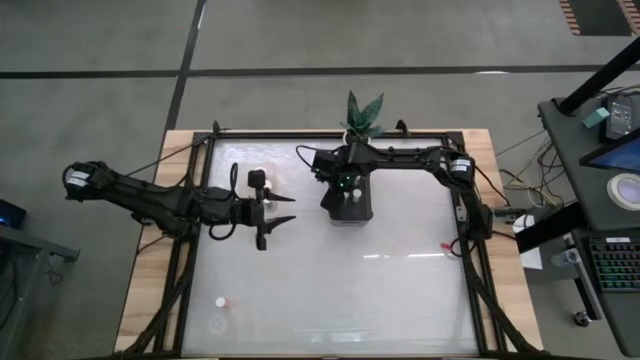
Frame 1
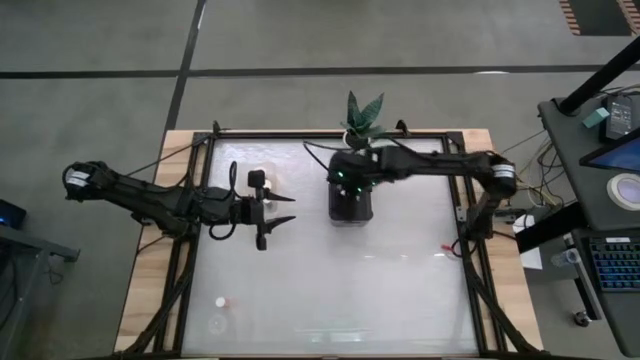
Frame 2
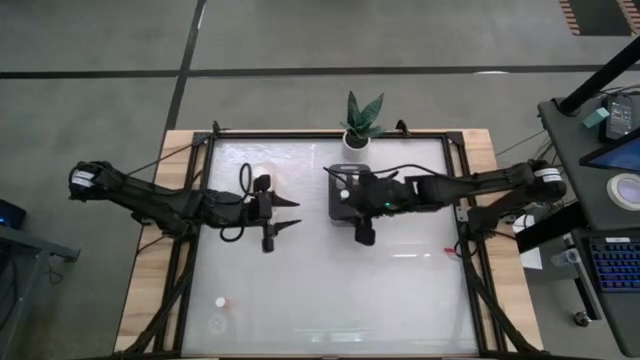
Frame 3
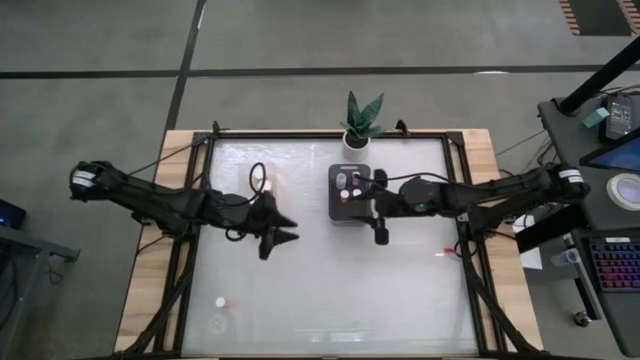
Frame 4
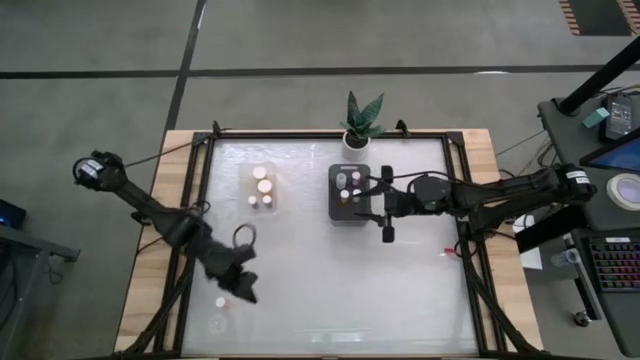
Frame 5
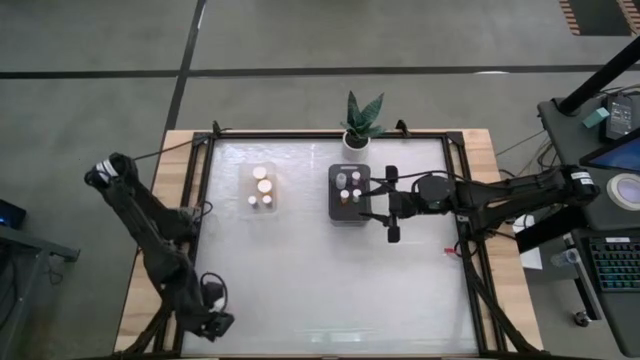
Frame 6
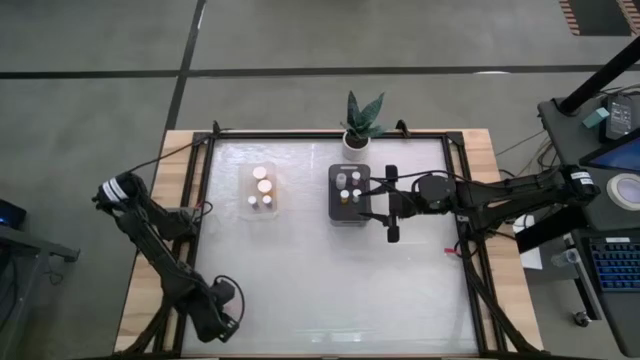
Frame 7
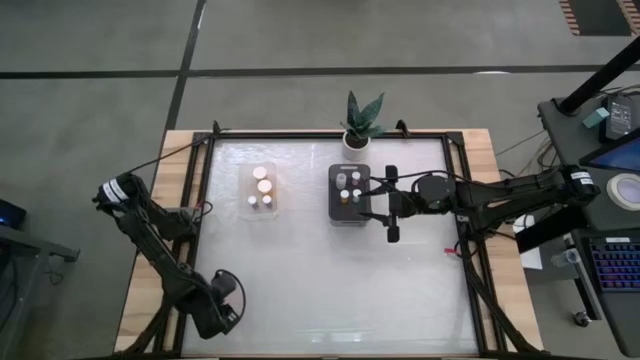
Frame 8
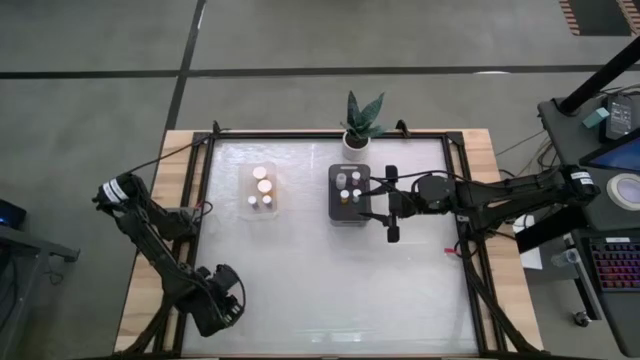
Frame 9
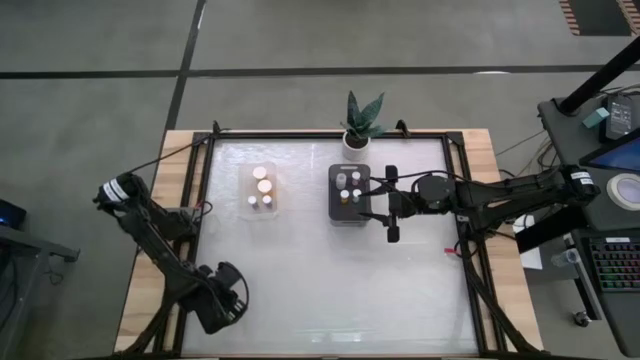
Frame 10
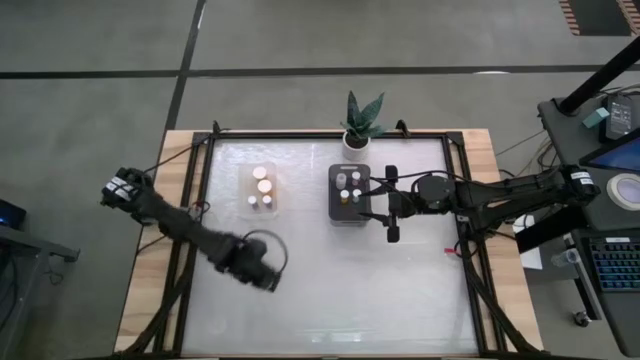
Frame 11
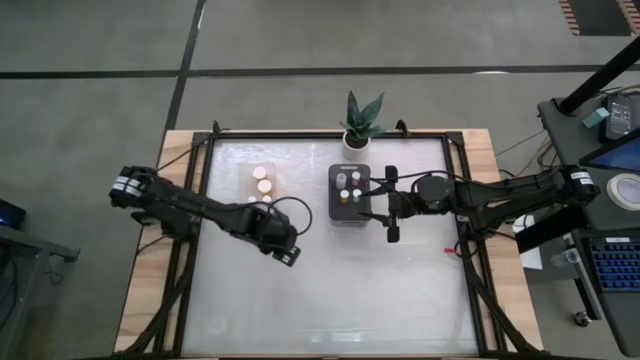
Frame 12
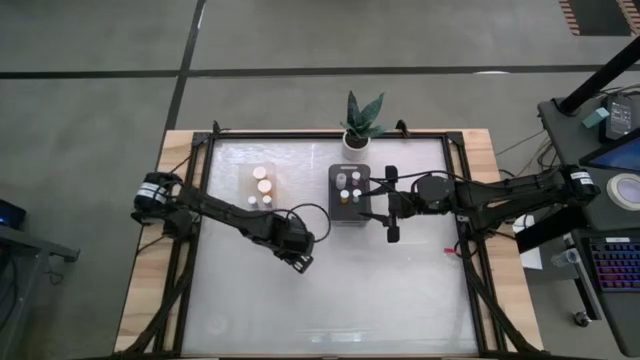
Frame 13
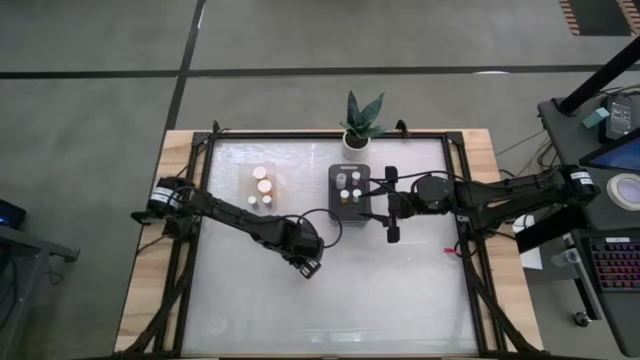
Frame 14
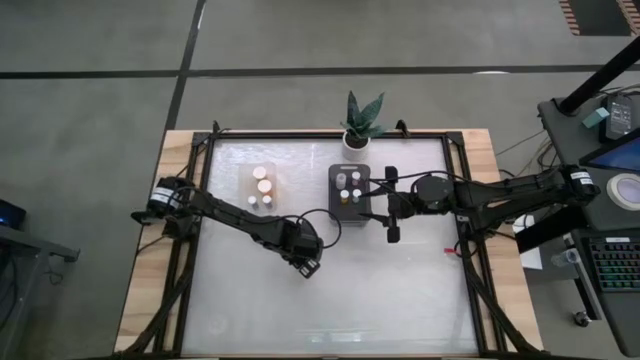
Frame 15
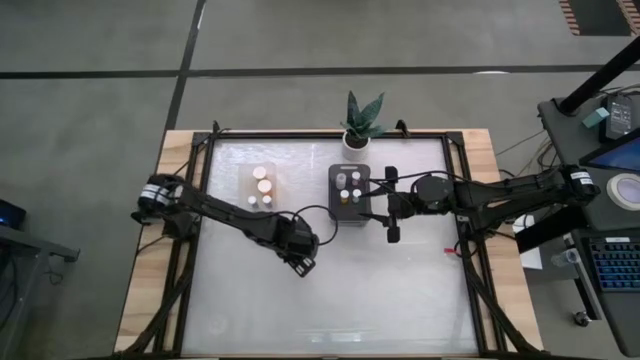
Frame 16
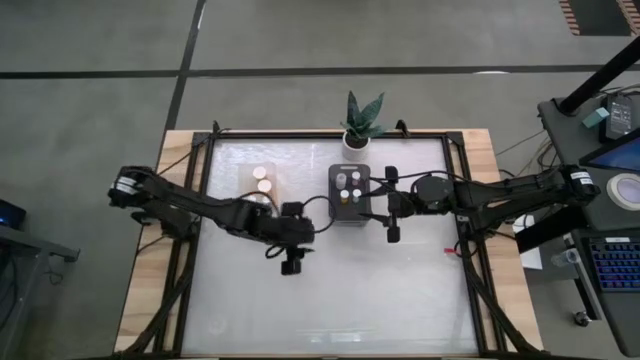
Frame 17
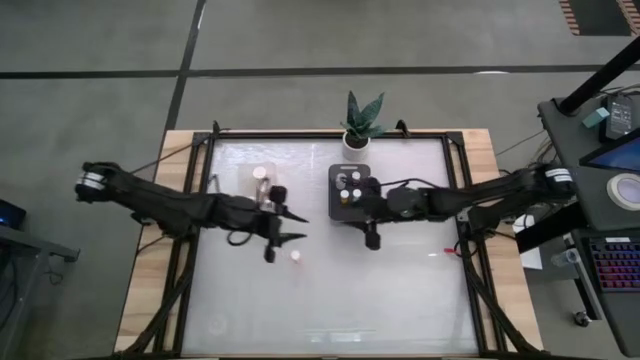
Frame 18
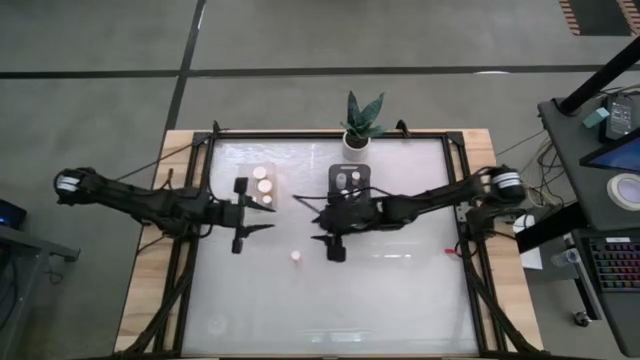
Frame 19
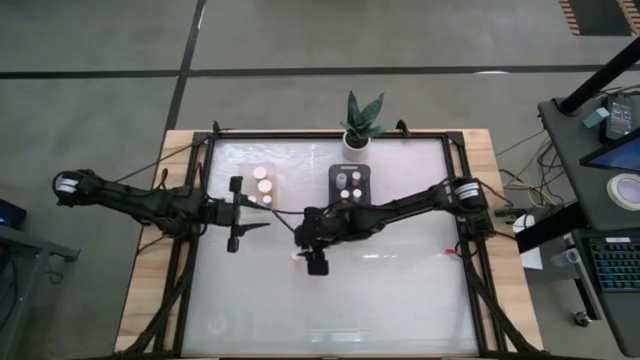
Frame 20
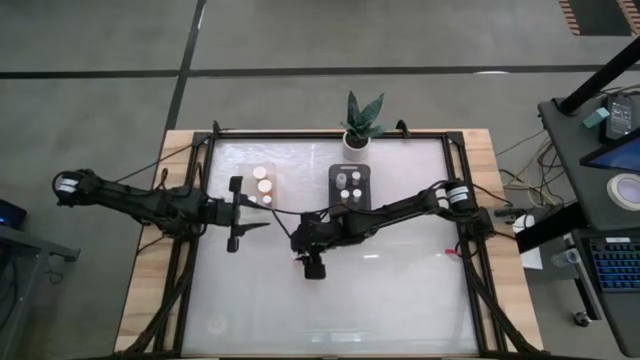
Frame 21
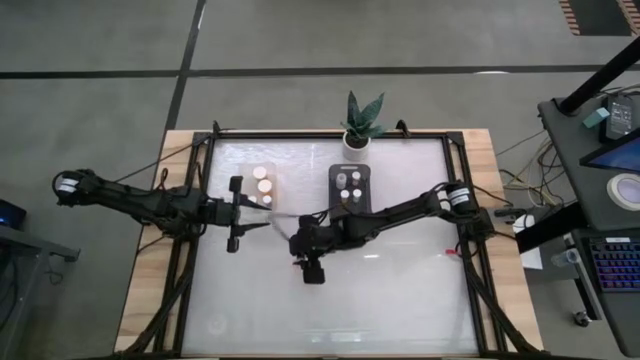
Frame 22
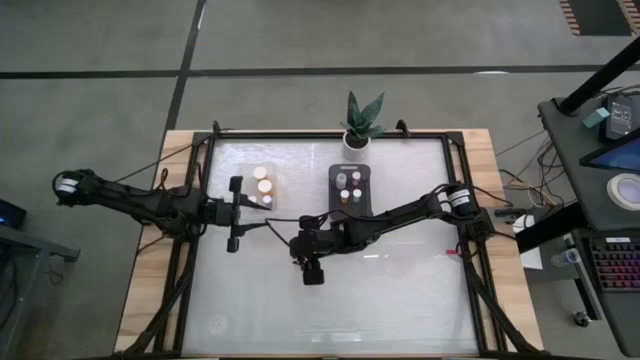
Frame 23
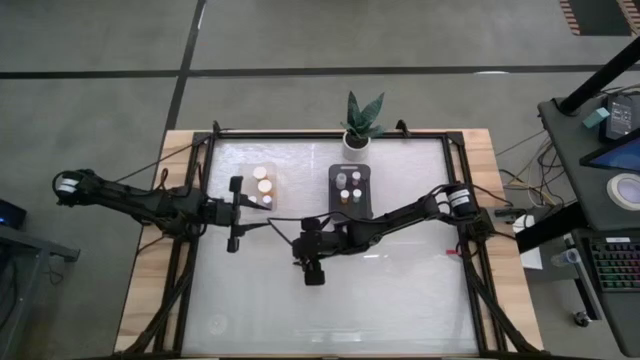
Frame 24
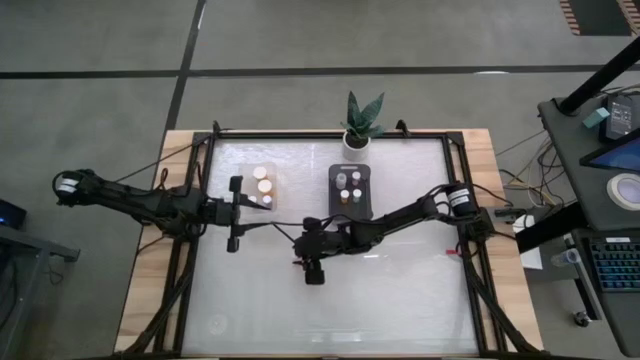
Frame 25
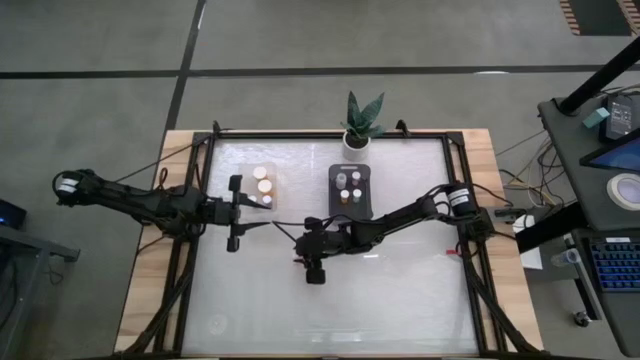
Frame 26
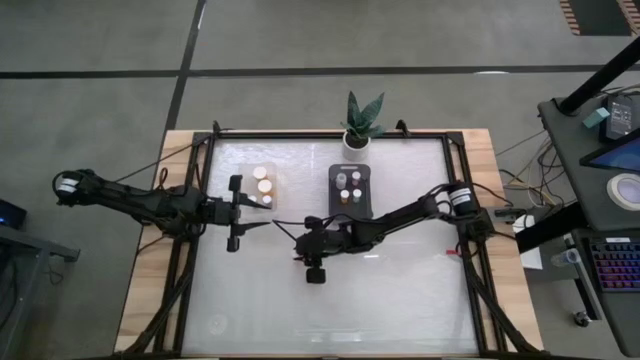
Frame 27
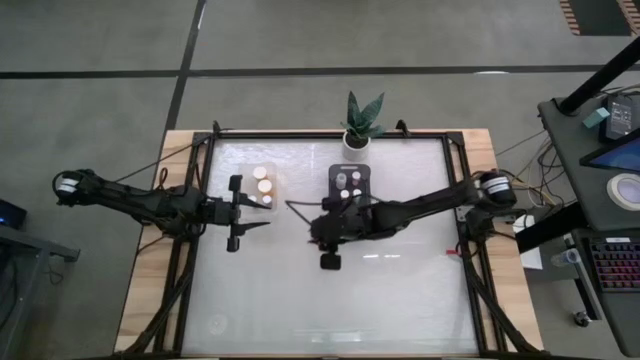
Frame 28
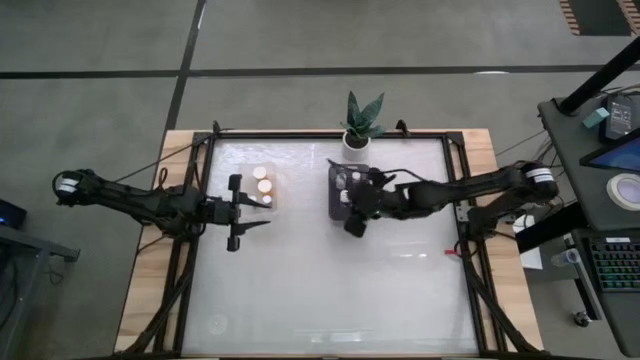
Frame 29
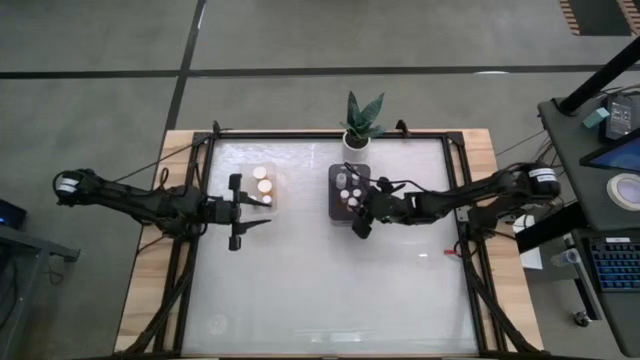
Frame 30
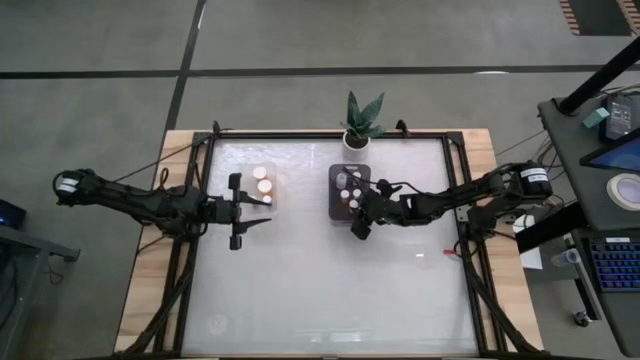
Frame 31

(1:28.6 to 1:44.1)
Task: Pick and place medicine bottles into bin by pill shape (circle, oval)
Put the pink pill bottle into the black bin

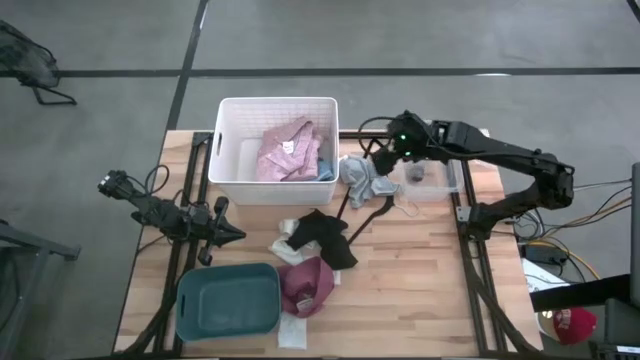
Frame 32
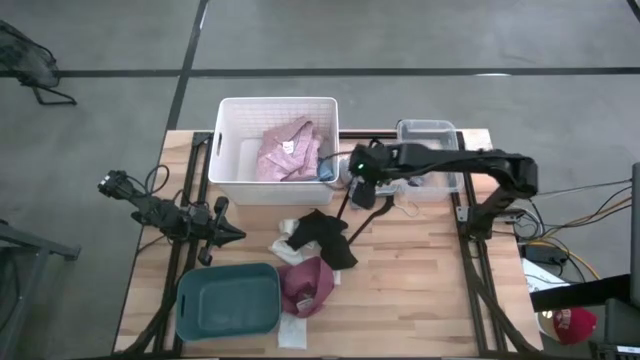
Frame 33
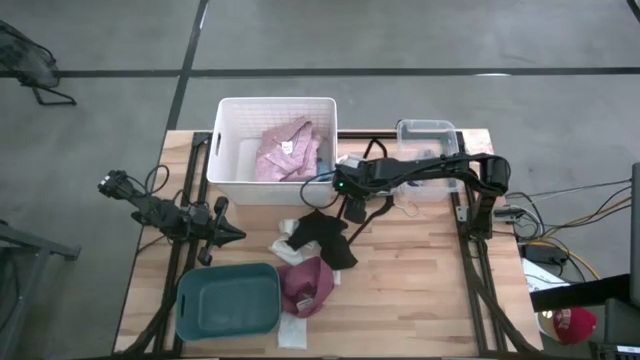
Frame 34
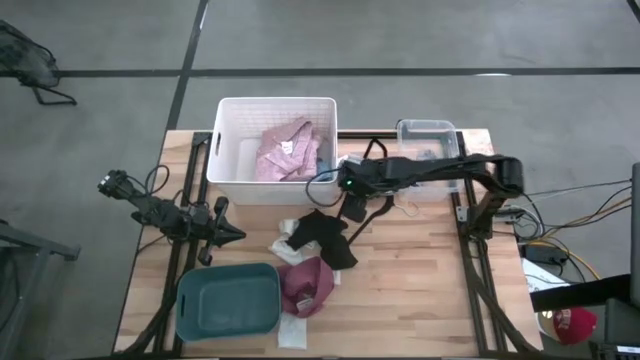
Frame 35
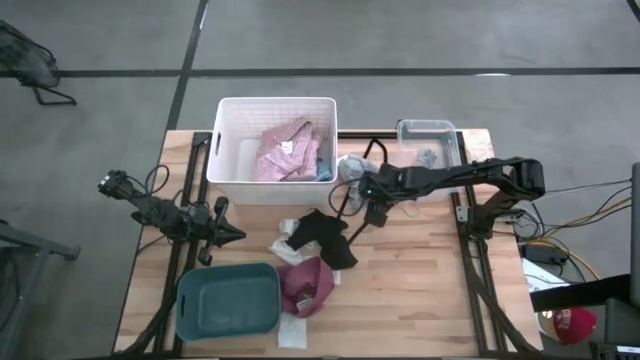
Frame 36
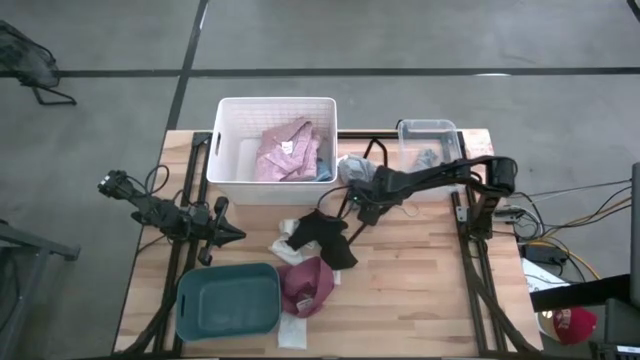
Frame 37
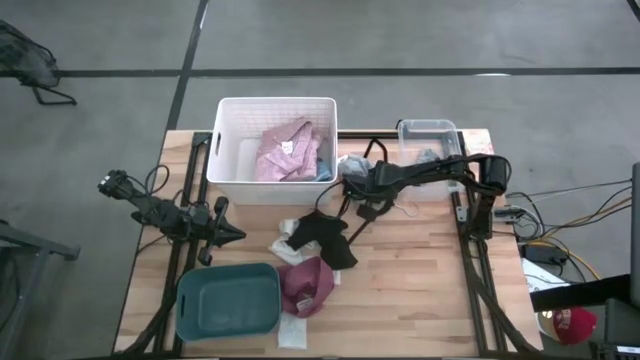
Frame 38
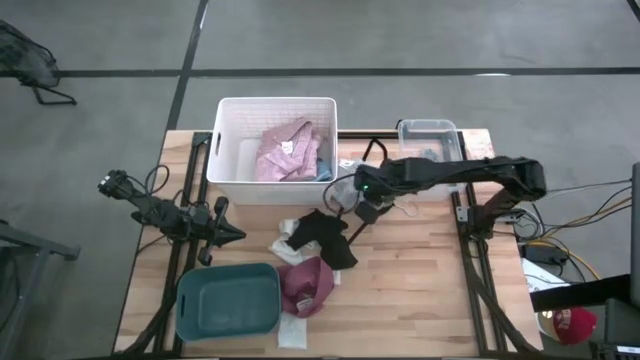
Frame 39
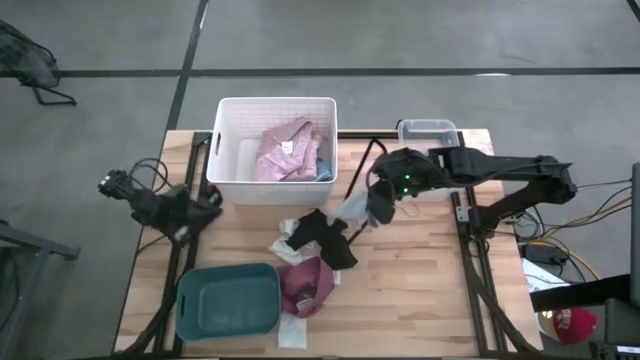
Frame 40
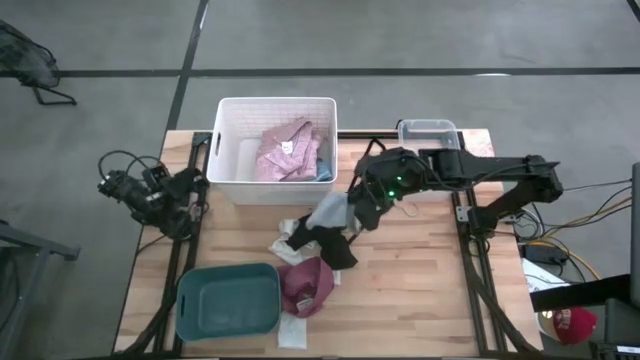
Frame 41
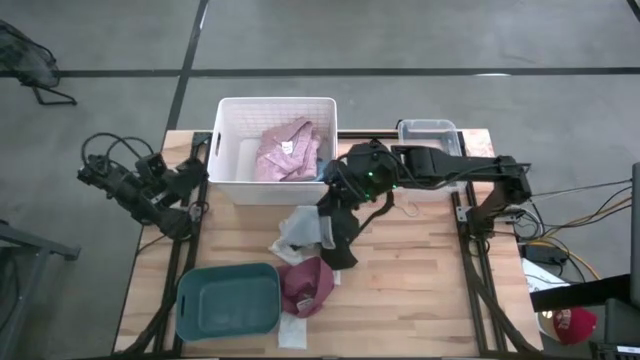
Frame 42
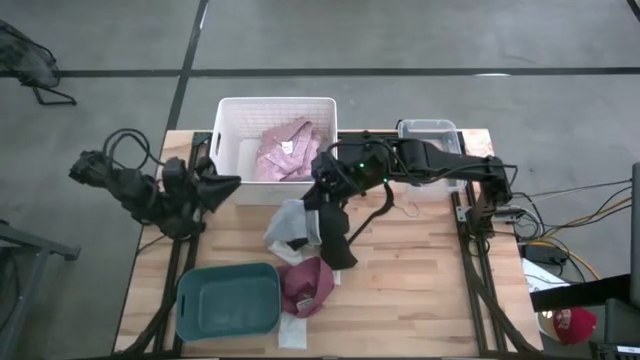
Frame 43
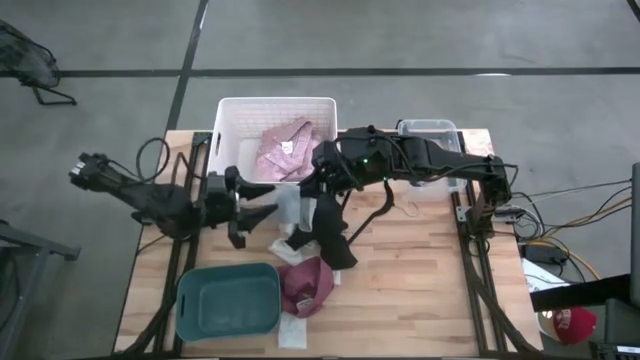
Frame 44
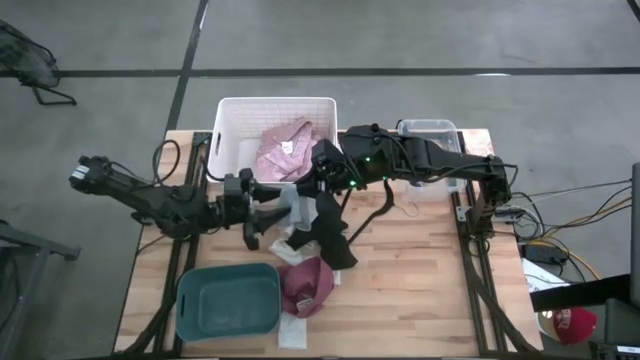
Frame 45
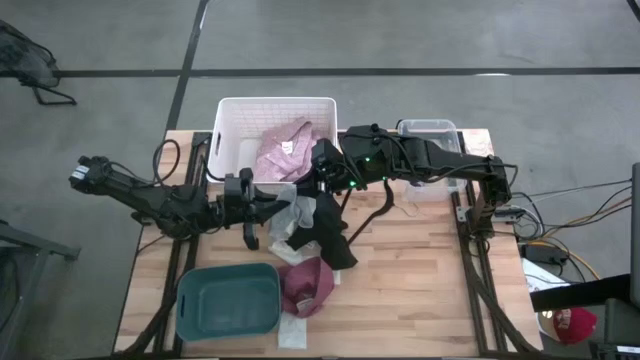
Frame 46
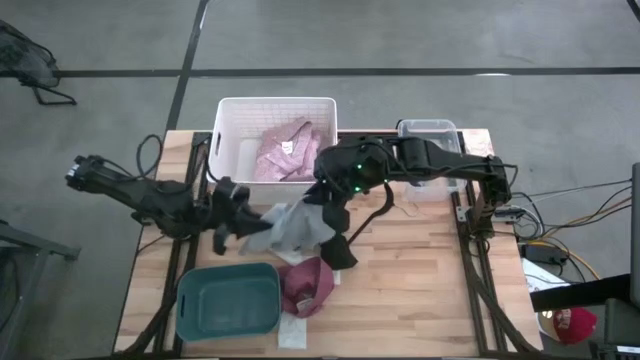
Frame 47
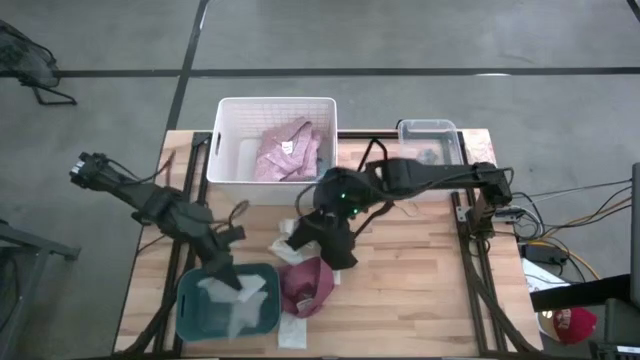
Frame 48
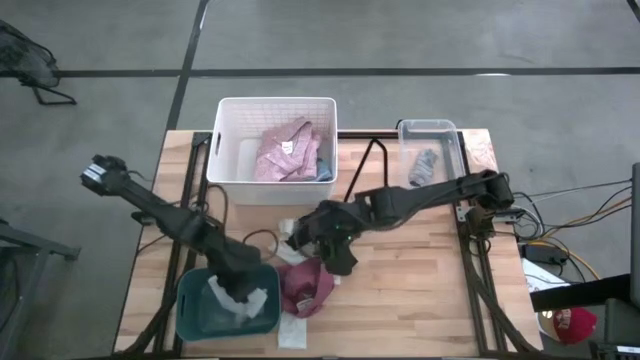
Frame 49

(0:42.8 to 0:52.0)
Task: Pick & Place Cloths
Put the gray boxer into the blue bin
